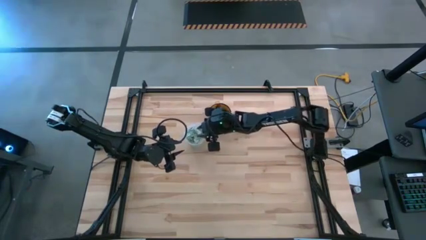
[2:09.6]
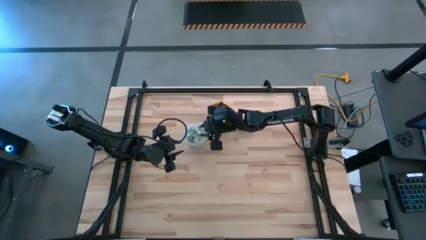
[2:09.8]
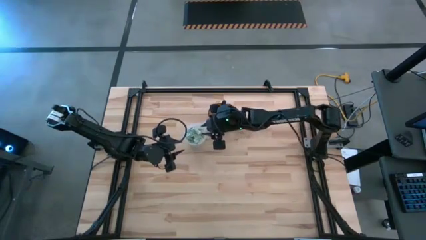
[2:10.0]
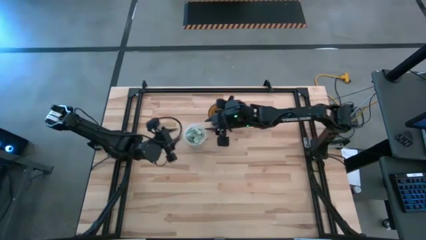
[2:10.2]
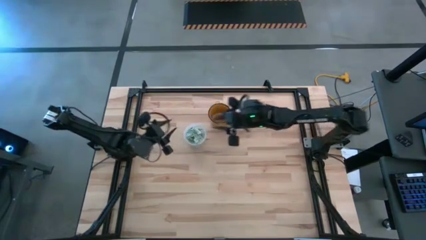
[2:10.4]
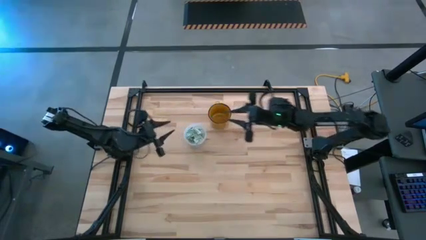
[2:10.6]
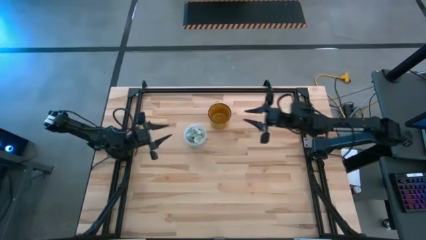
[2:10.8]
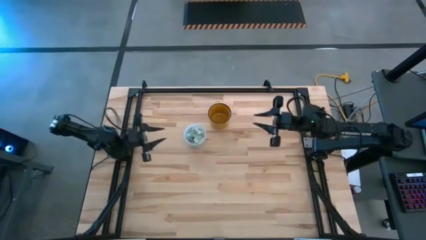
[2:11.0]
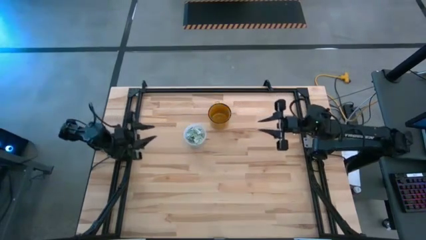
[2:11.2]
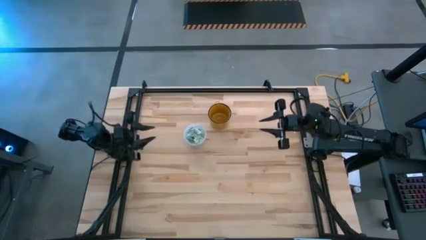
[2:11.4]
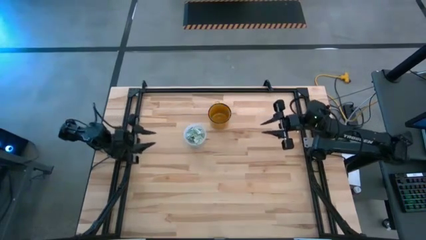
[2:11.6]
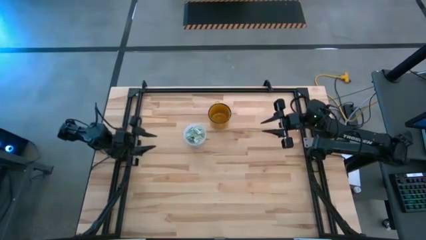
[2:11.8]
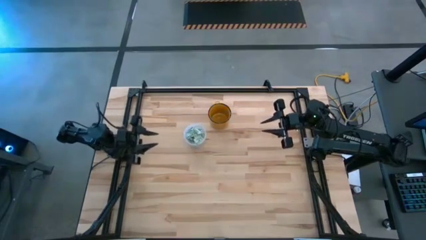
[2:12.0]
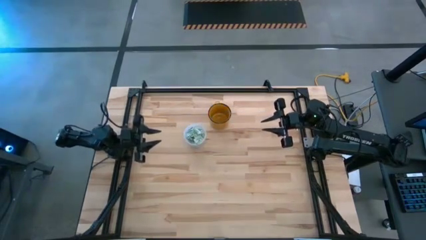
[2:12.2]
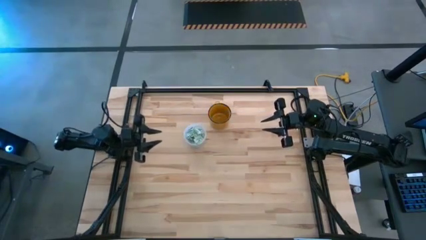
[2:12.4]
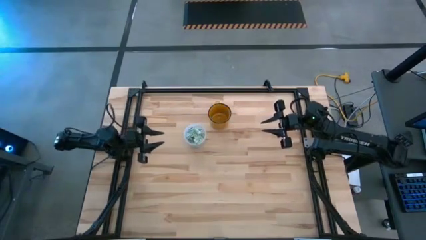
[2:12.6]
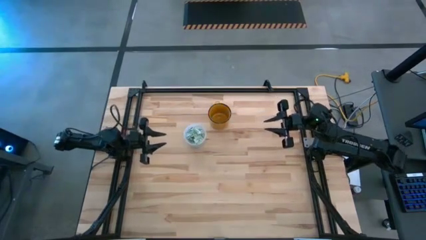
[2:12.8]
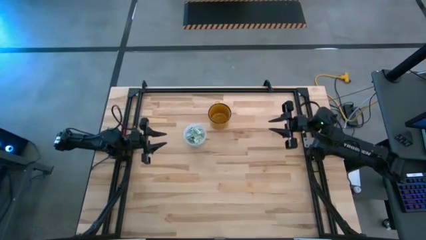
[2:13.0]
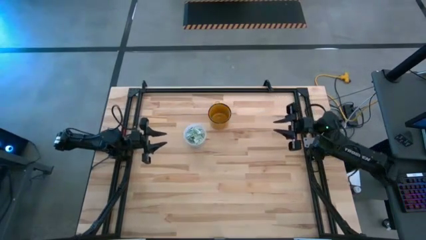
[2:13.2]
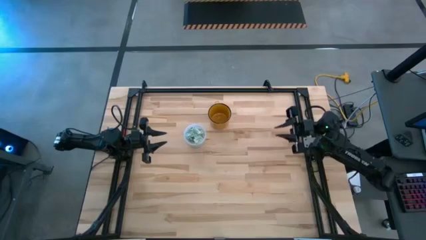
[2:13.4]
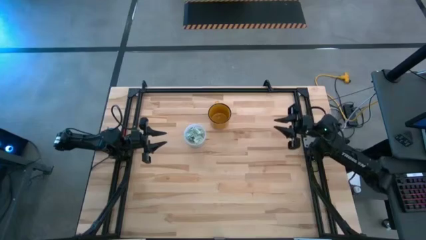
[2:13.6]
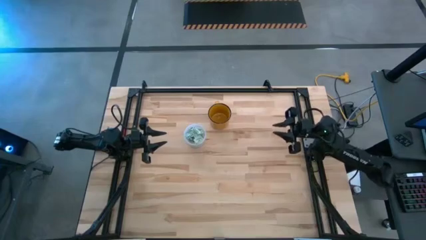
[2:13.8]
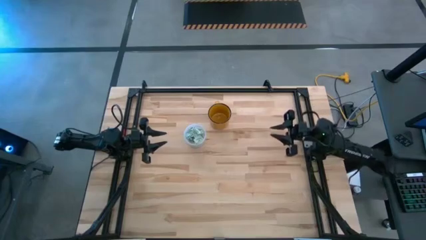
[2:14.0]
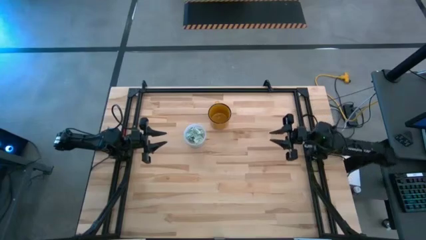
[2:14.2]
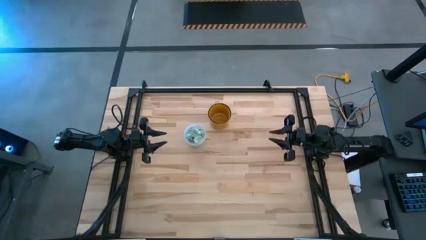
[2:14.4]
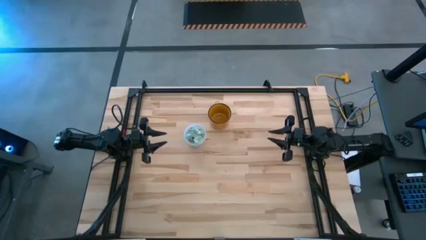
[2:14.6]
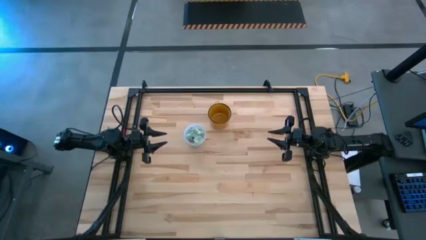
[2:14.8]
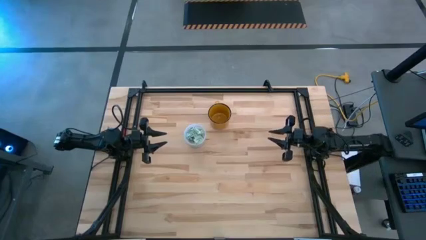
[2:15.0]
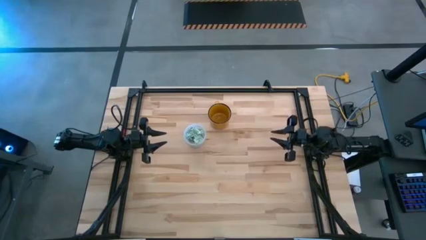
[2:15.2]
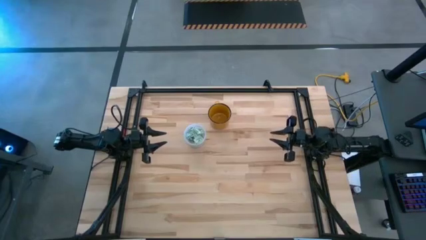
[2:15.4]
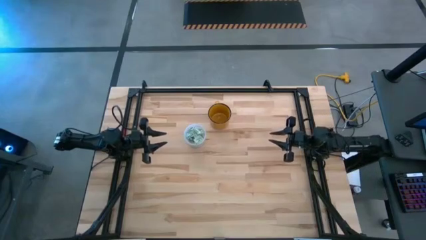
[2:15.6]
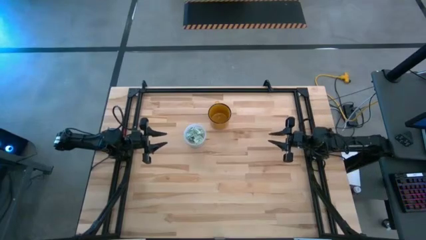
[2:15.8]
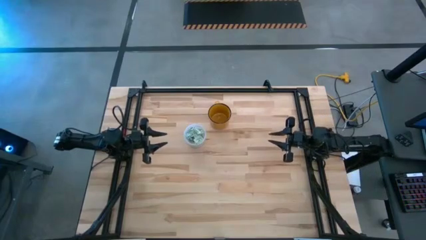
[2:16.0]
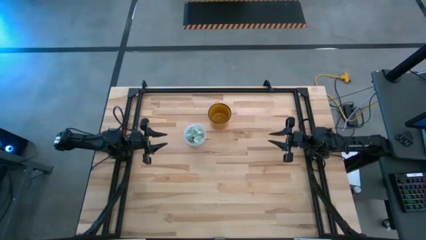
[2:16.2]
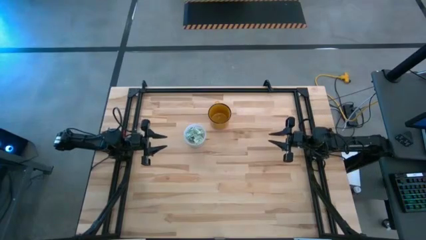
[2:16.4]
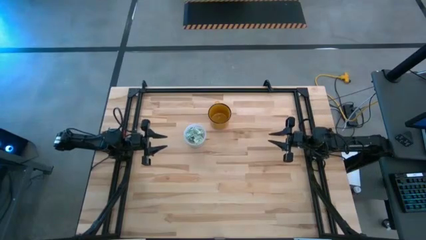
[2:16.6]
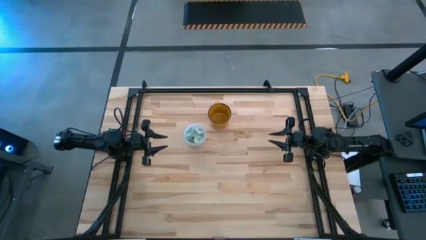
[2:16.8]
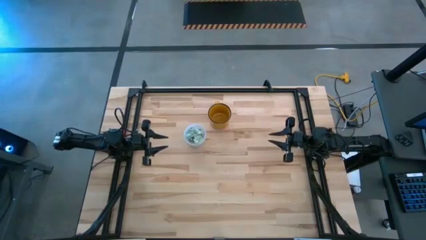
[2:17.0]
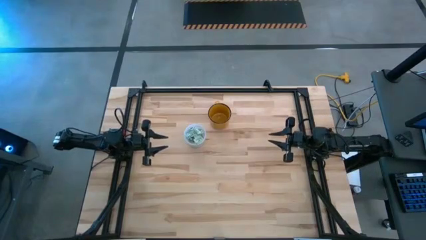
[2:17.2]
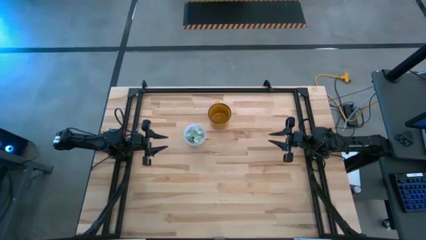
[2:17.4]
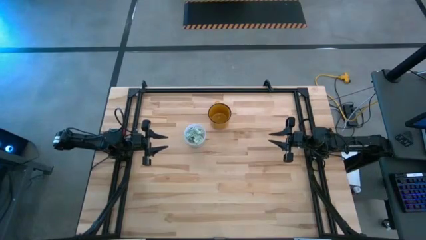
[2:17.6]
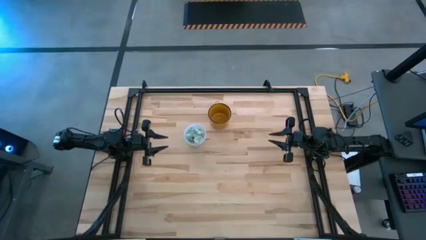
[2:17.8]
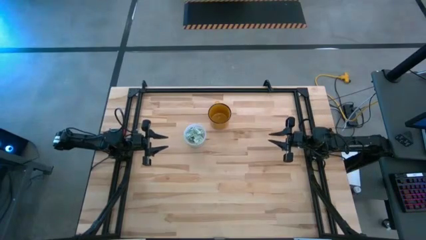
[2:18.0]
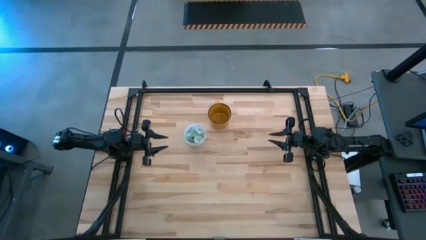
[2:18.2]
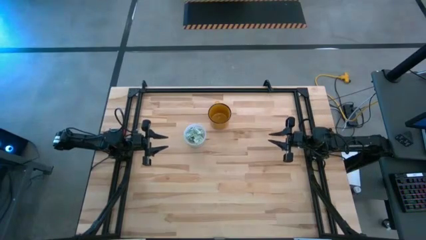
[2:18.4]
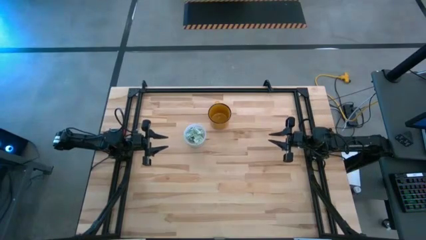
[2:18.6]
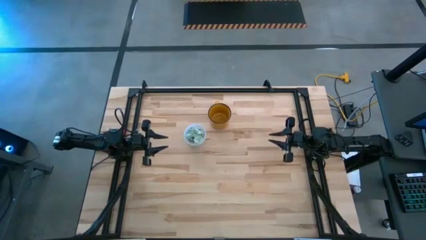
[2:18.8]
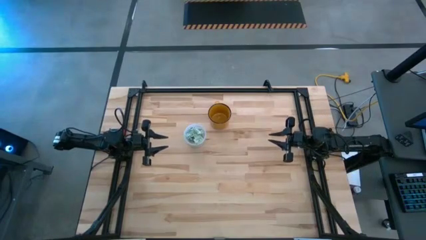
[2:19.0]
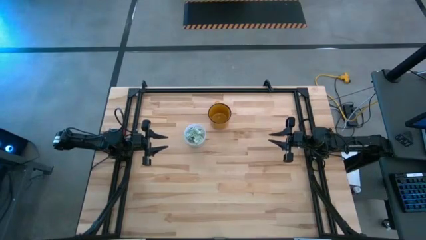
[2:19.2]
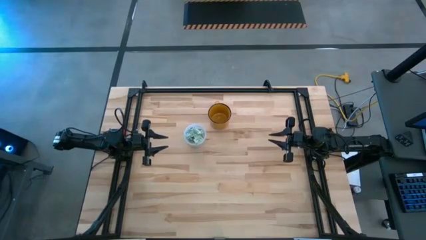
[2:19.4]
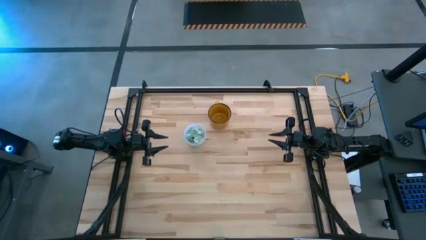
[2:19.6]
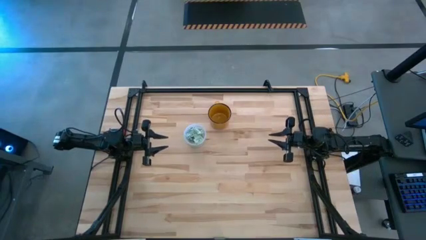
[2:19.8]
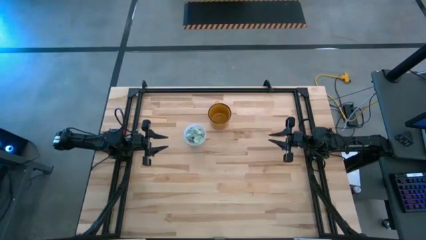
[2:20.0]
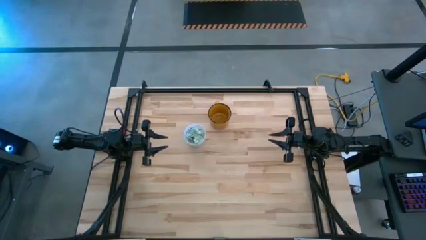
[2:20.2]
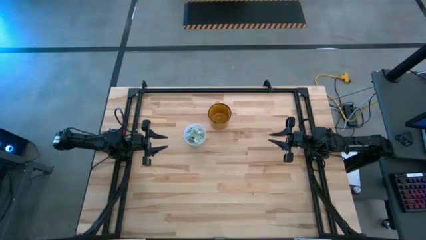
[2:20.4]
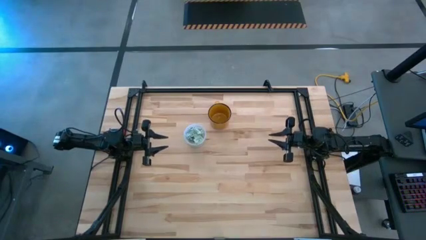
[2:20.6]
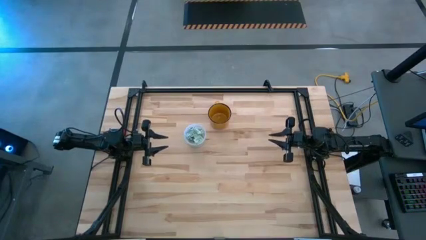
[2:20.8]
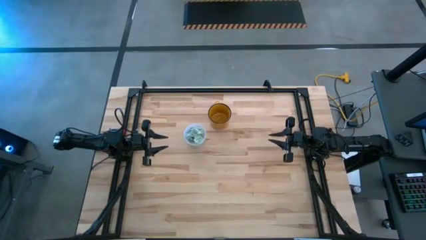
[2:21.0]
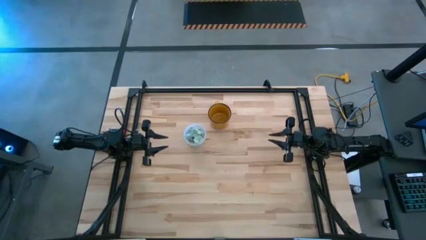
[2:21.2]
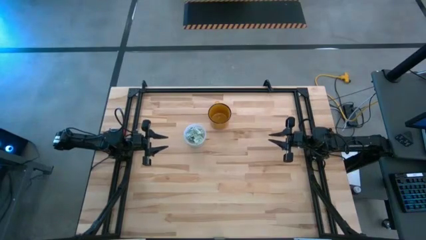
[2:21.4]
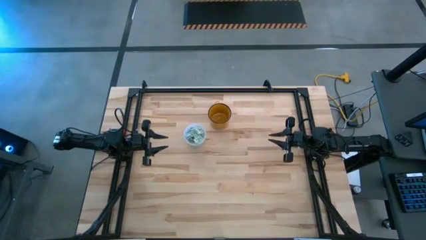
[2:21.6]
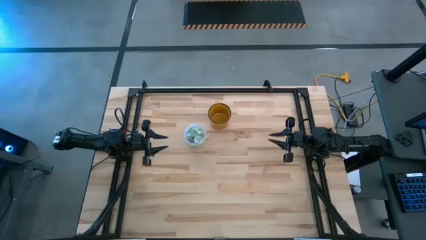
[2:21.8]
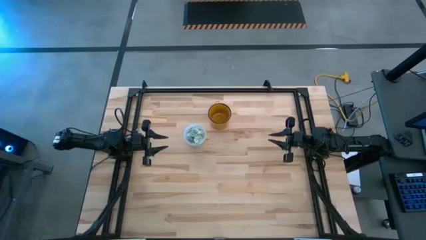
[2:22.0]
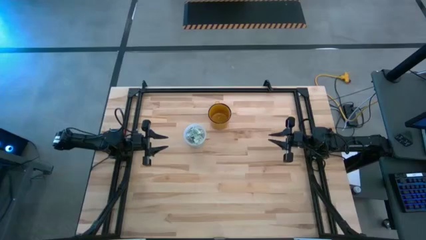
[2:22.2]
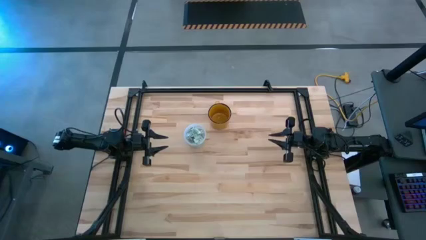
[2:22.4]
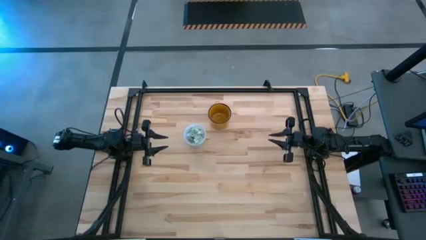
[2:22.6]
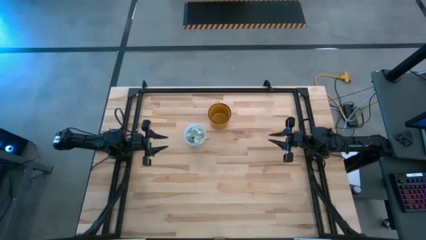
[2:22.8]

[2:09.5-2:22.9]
Task: Pick and place Stevia / Truvia into bins
Return to Home Position
